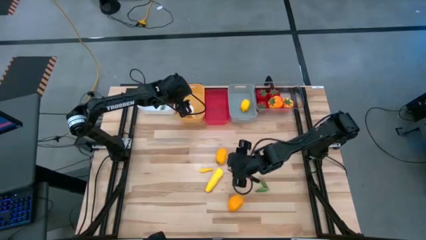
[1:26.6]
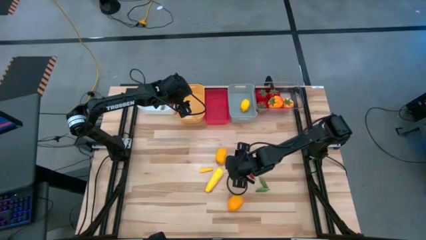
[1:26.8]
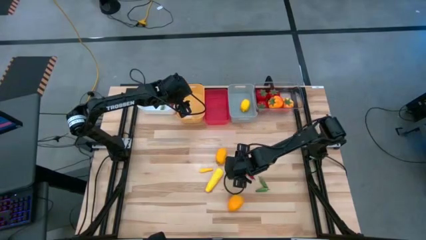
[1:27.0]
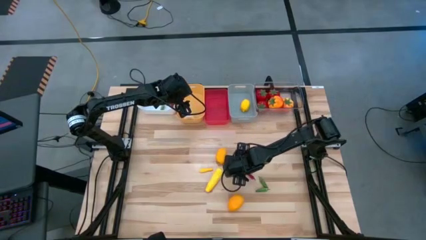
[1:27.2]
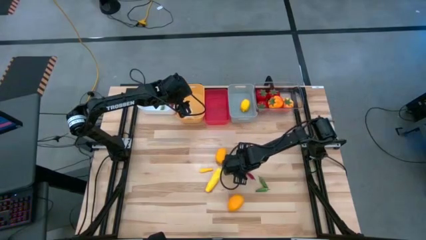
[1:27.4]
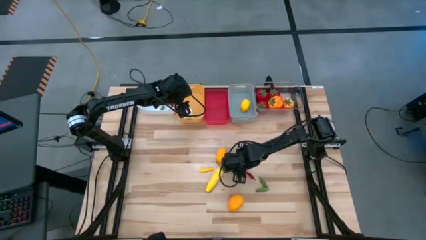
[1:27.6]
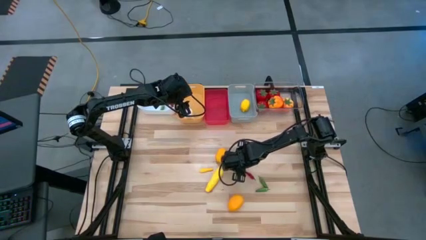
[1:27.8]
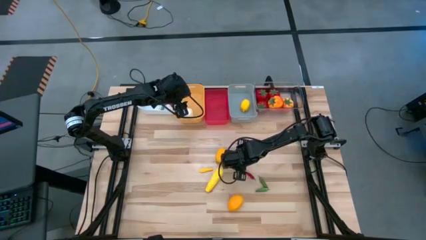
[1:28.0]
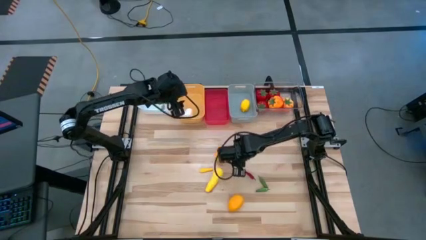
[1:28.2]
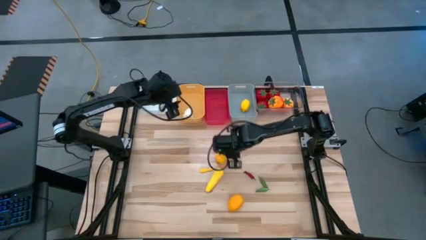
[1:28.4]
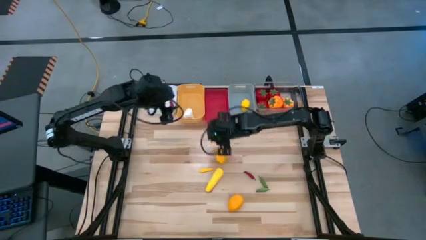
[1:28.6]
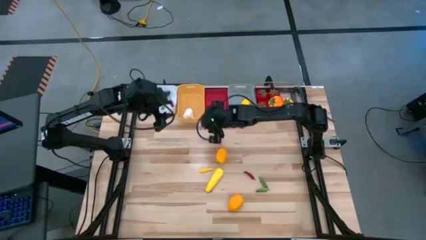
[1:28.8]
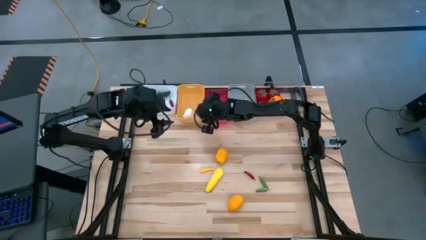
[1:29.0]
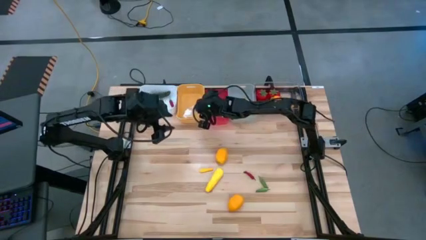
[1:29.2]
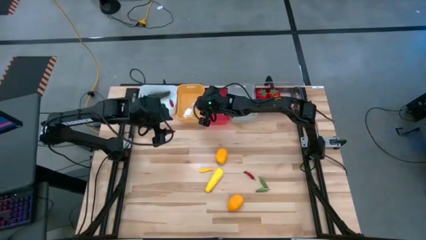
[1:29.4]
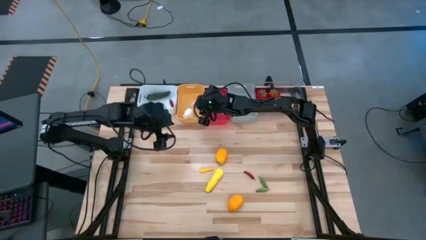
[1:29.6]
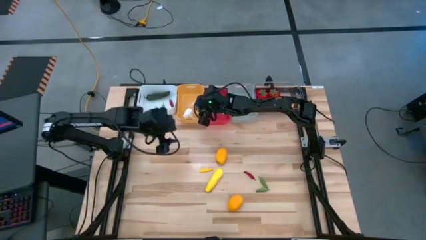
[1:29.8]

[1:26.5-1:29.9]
Task: Sort produce into baskets
Put the garlic into the yellow bin

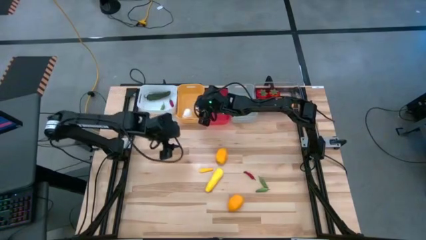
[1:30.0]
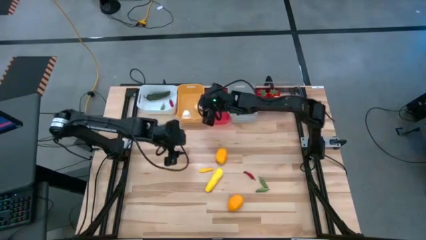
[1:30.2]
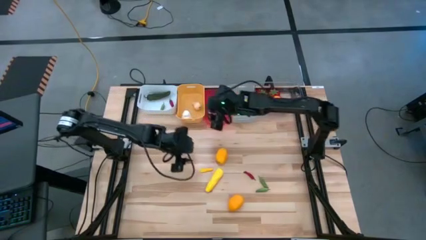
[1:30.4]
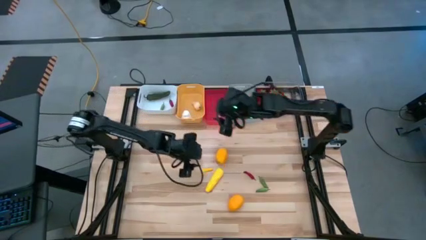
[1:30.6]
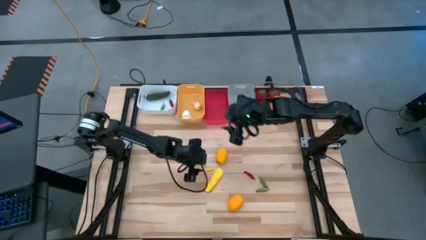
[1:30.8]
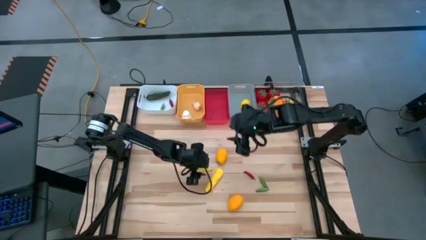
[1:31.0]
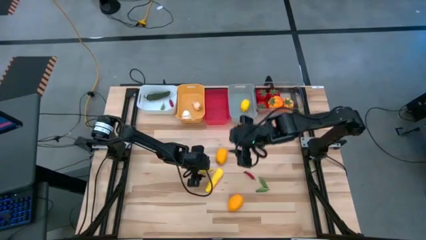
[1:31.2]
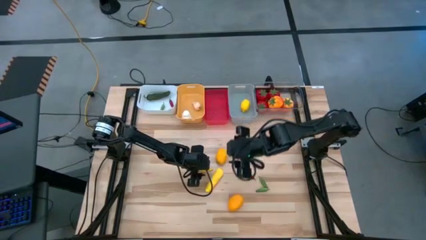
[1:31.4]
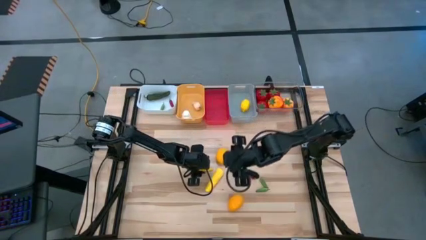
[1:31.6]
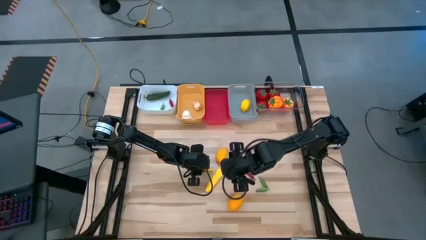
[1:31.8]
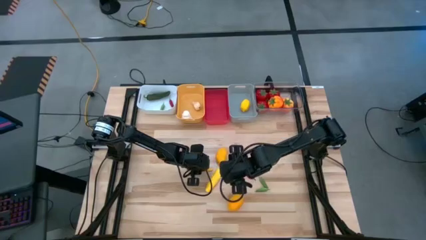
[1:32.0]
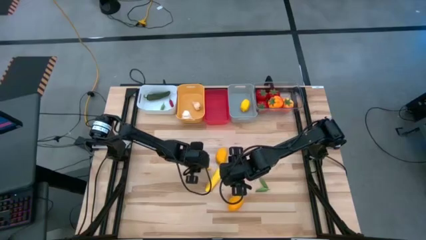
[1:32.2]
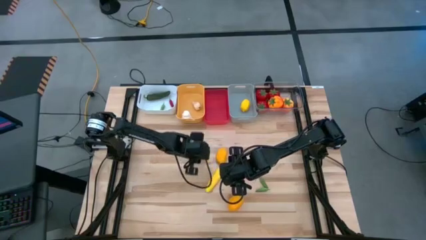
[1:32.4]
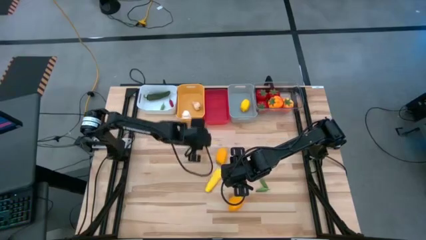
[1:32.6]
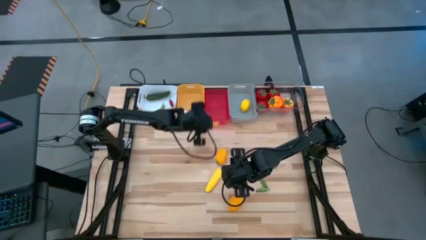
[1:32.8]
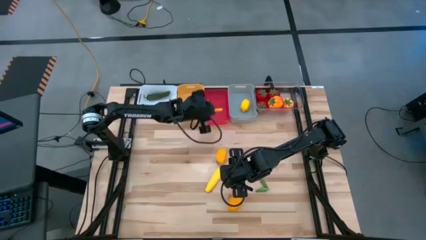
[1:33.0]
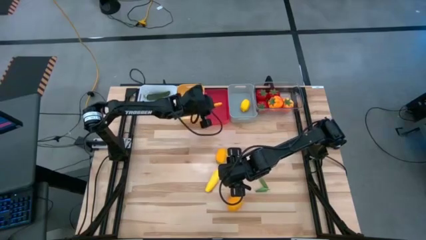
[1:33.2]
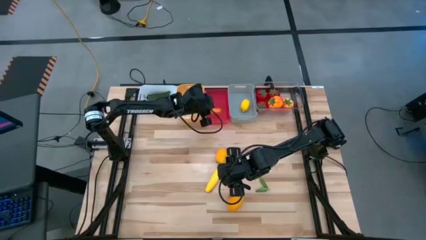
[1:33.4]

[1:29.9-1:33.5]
Put the yellow corn into the red bin

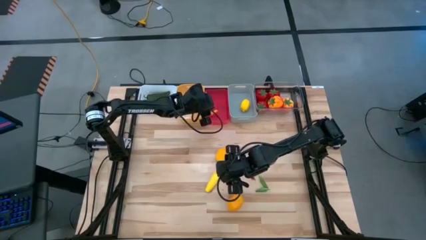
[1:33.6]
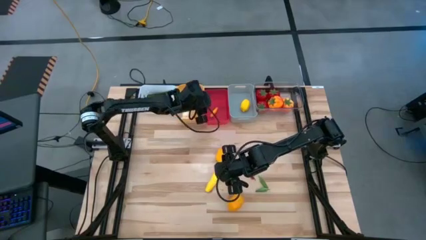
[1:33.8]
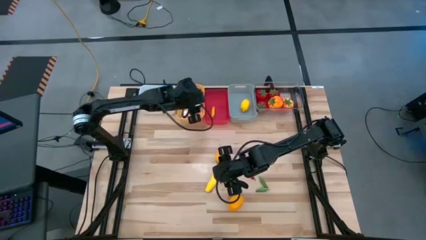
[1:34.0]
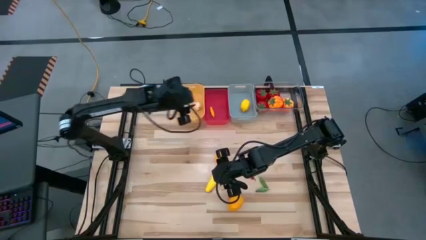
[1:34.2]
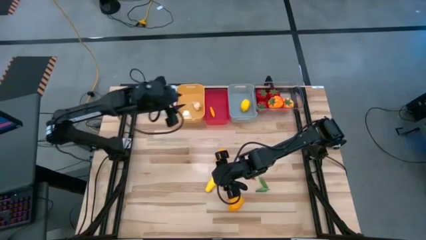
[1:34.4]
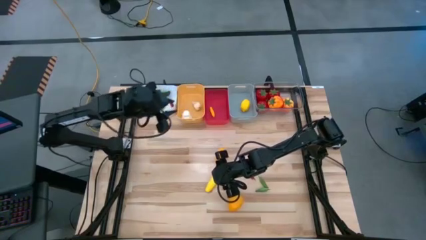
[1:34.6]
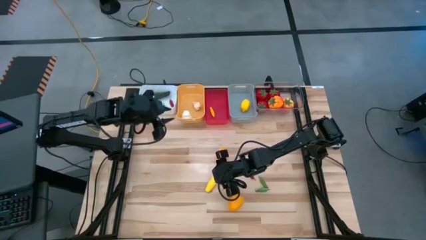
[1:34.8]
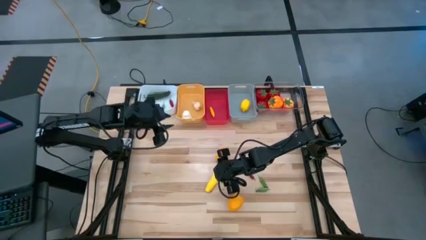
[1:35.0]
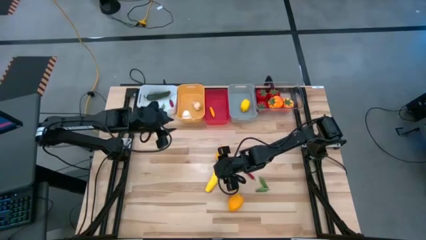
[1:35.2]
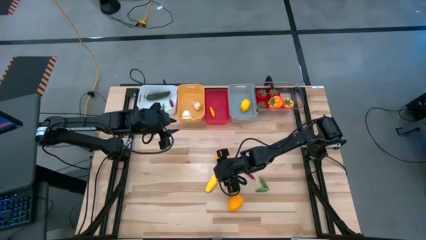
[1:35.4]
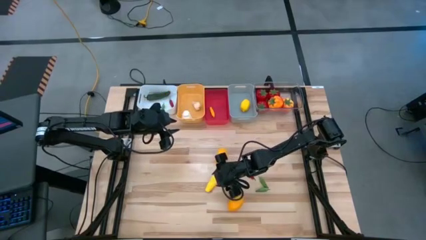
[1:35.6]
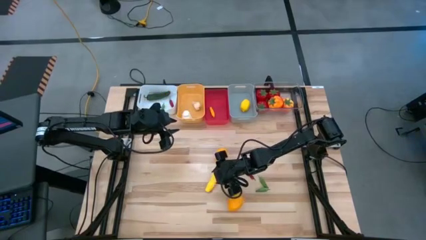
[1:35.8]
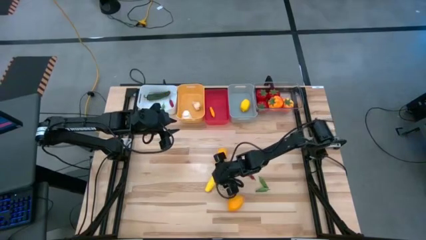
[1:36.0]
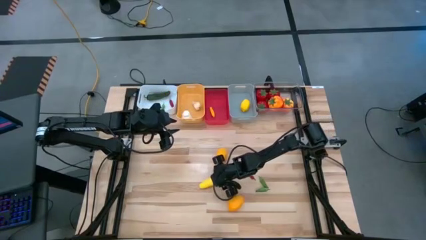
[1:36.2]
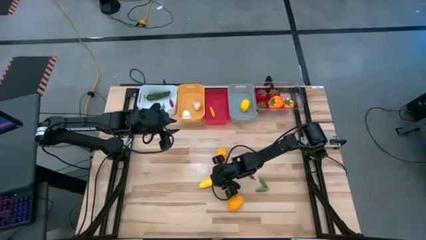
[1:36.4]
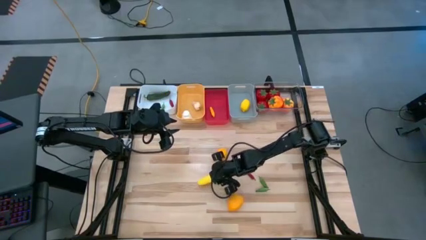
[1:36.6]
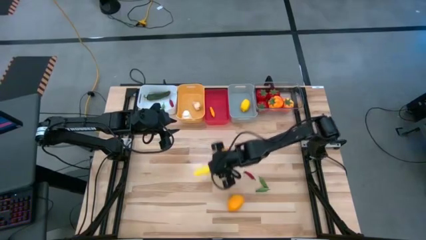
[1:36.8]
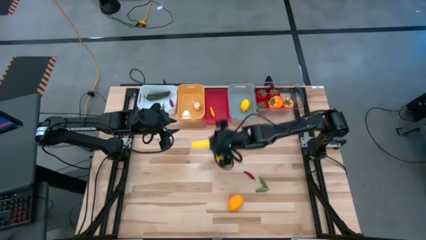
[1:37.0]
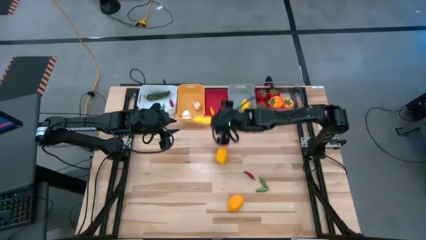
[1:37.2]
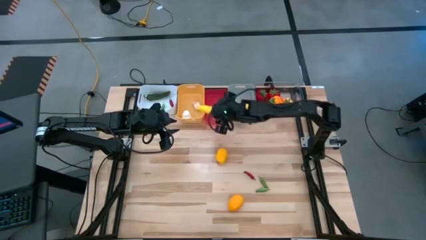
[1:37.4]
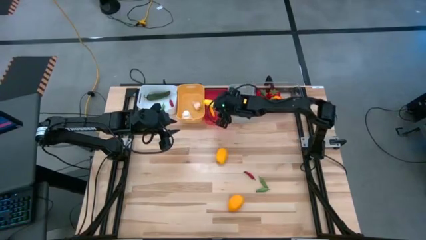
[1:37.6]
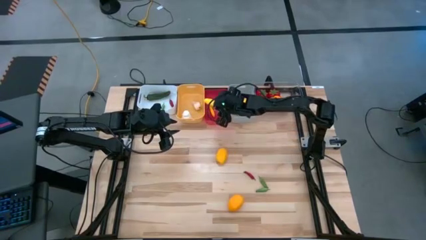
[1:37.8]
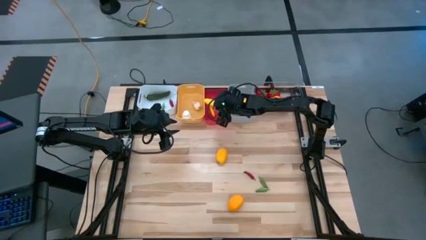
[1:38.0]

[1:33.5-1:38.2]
Put the yellow corn into the red bin

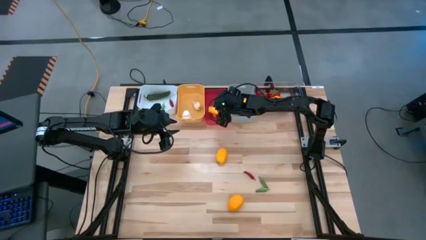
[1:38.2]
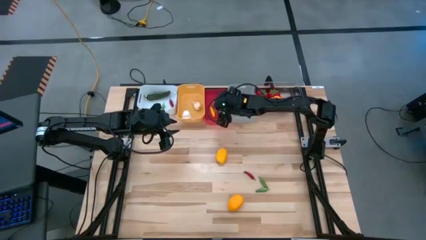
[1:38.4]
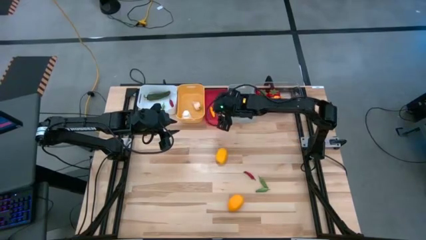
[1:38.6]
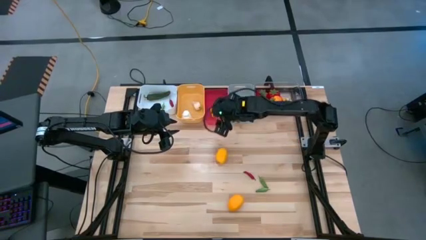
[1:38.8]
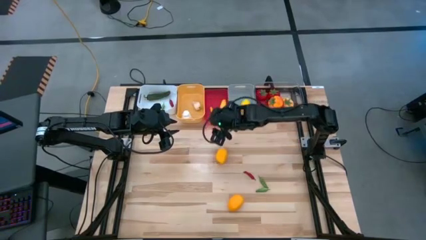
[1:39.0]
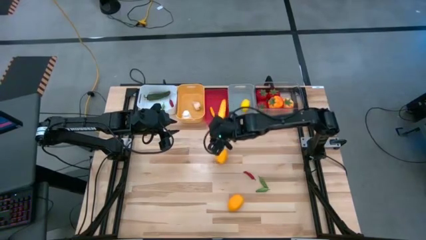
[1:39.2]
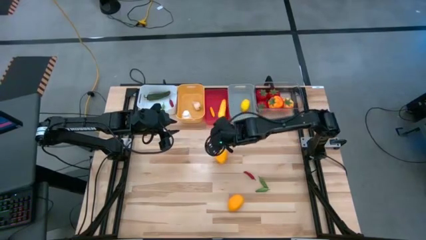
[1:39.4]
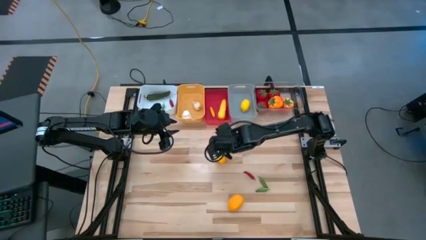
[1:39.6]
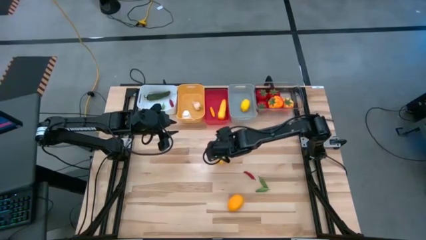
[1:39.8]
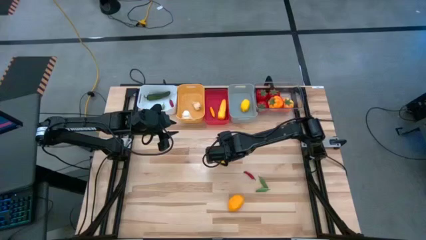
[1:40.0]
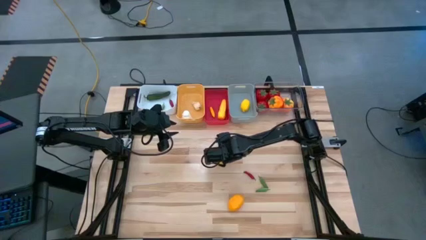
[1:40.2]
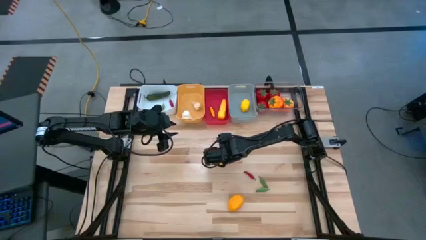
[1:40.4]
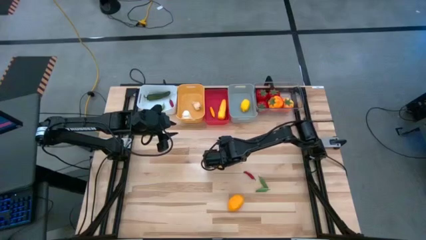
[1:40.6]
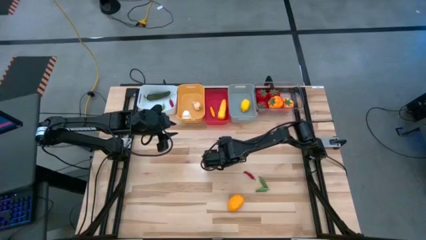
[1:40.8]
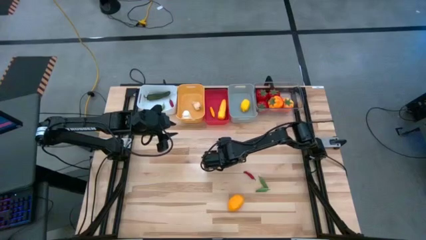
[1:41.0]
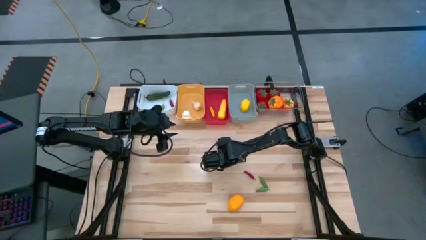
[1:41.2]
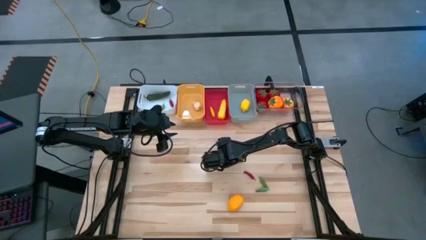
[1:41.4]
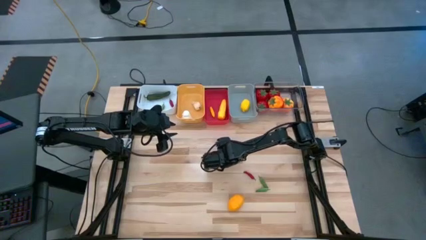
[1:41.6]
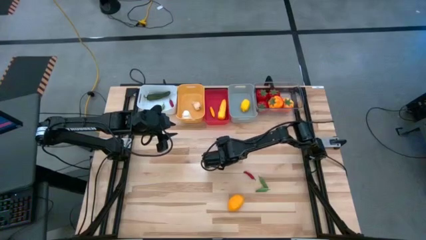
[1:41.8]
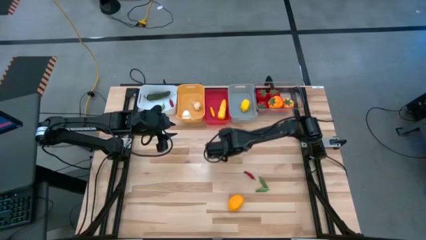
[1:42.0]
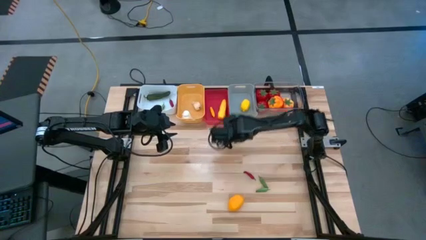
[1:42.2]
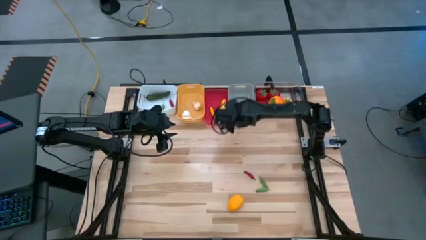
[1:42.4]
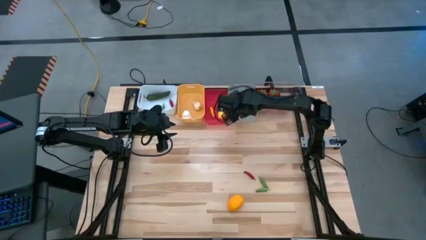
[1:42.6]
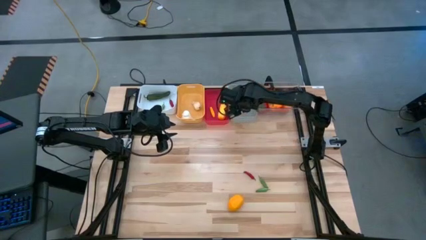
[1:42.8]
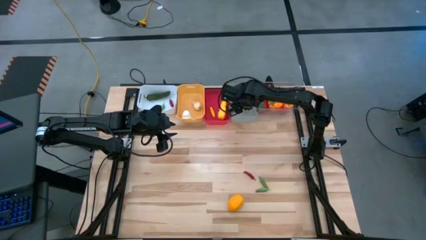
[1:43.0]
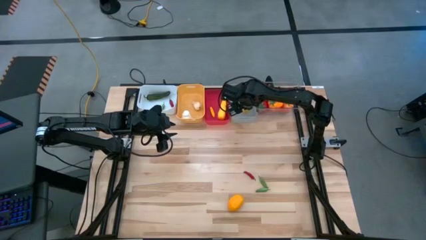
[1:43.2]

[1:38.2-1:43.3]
Put the yellow lemon into the gray bin
